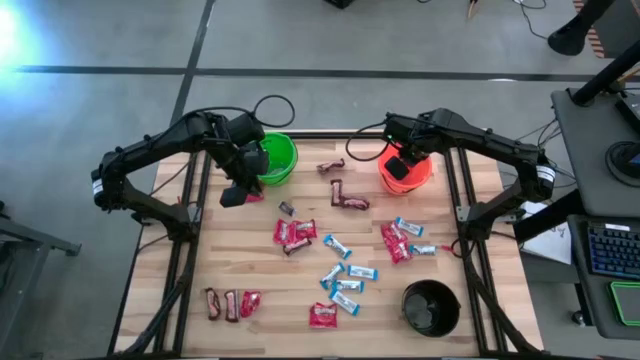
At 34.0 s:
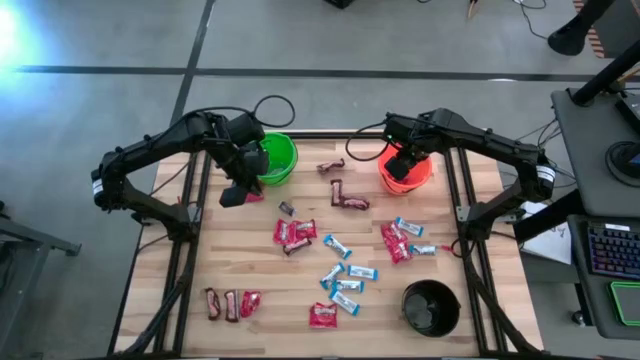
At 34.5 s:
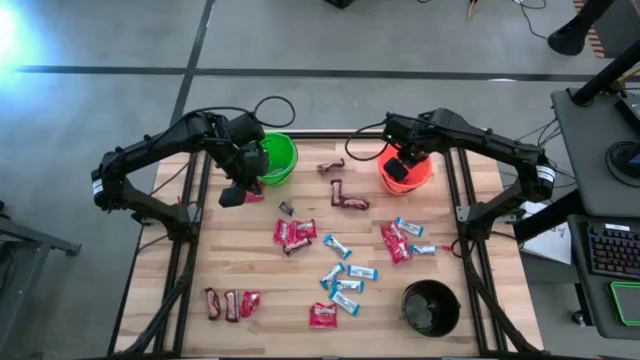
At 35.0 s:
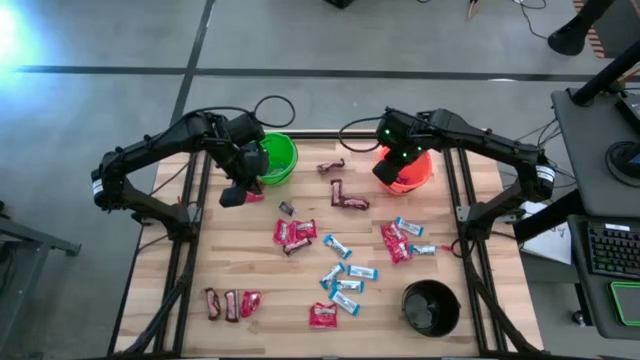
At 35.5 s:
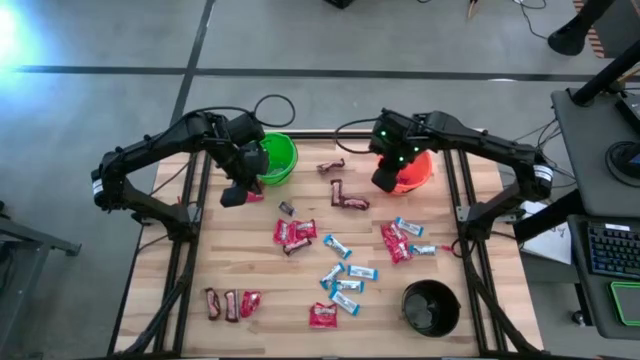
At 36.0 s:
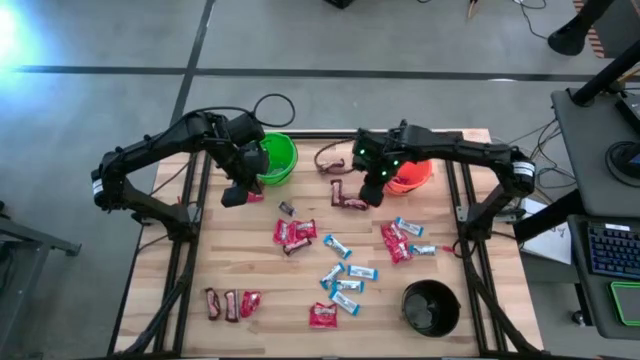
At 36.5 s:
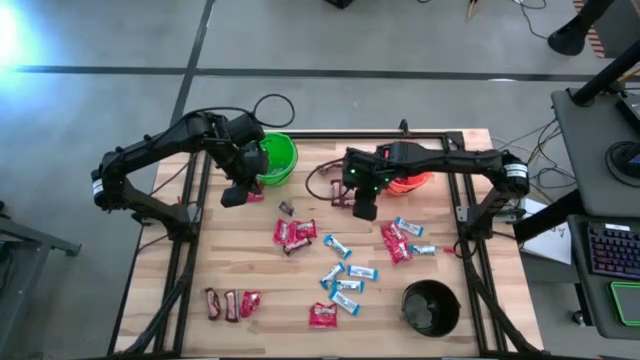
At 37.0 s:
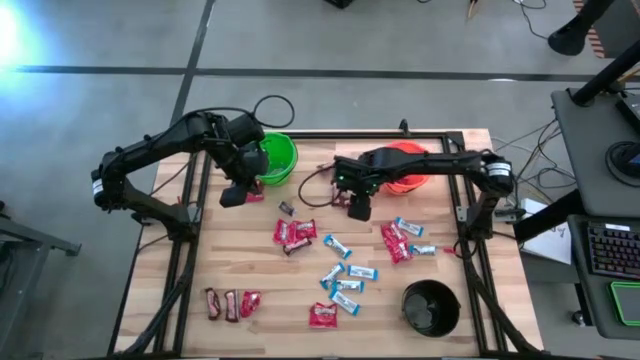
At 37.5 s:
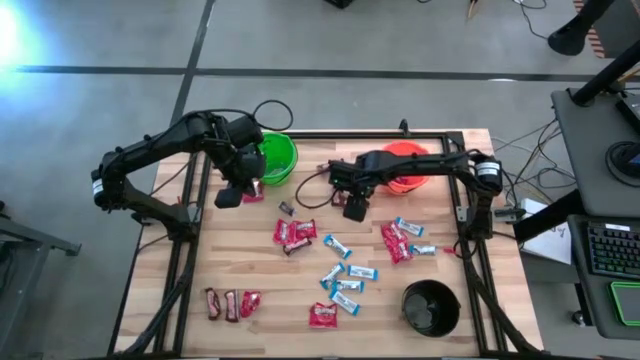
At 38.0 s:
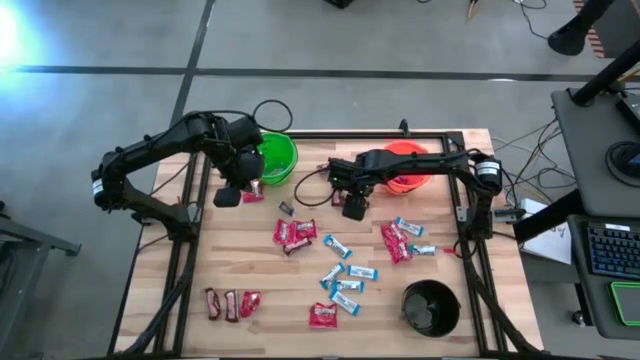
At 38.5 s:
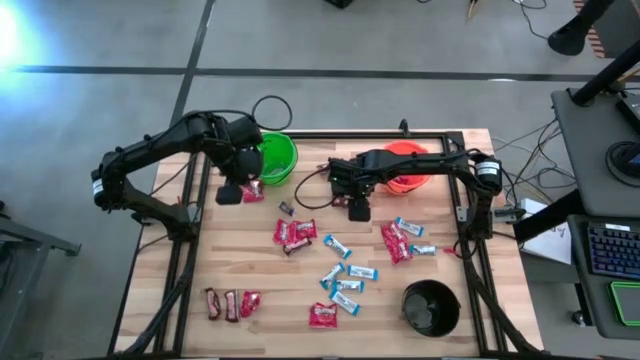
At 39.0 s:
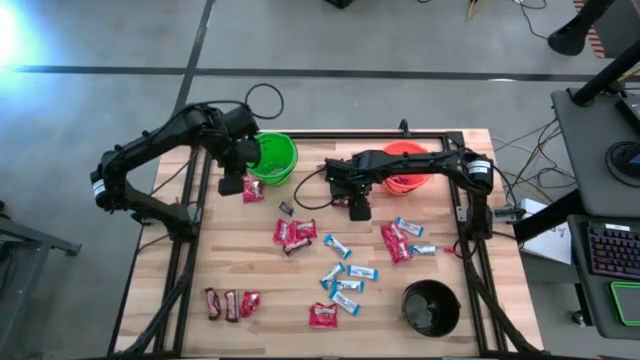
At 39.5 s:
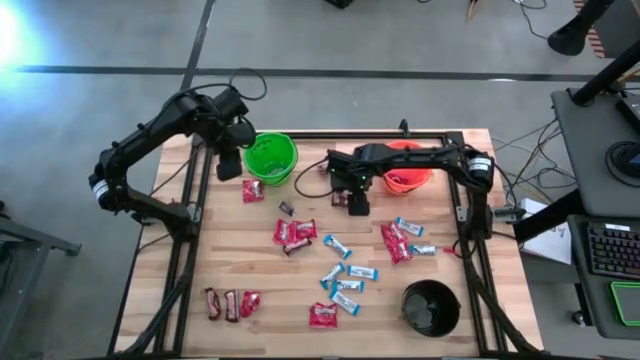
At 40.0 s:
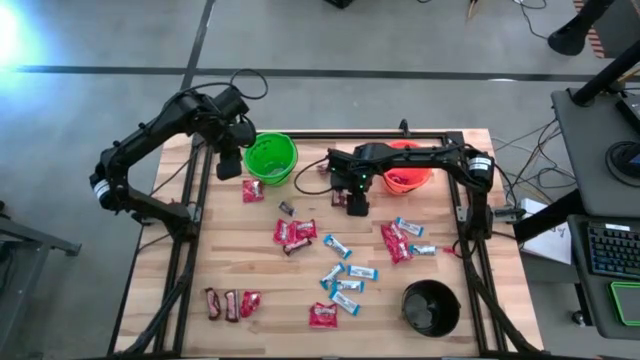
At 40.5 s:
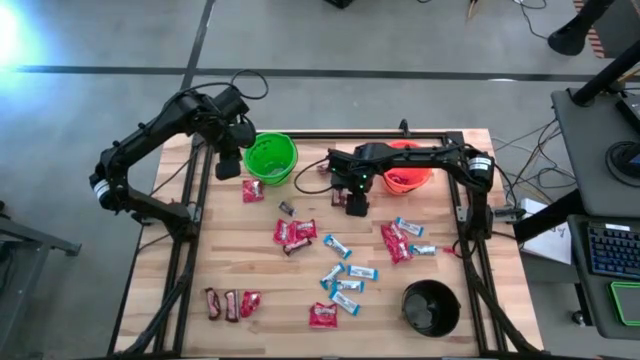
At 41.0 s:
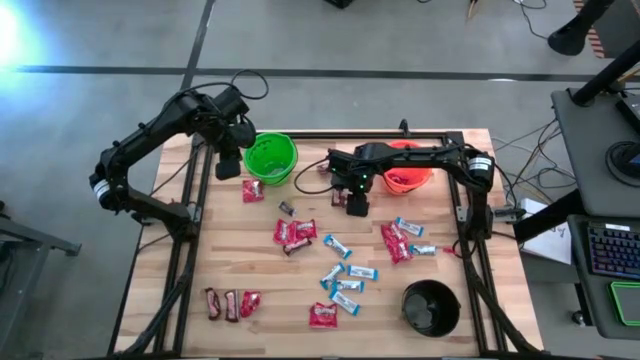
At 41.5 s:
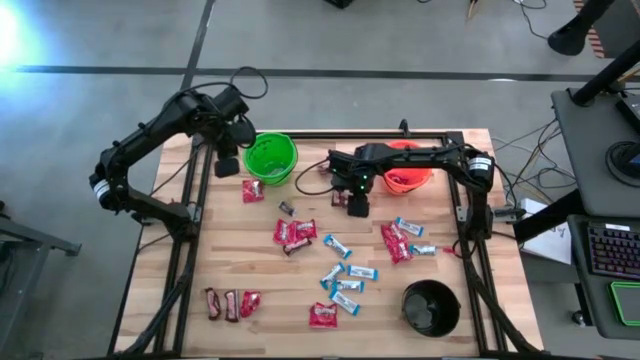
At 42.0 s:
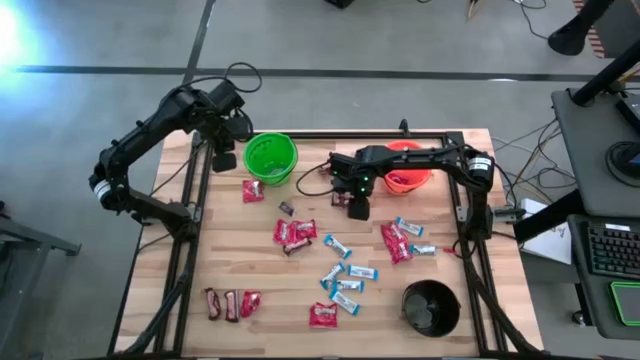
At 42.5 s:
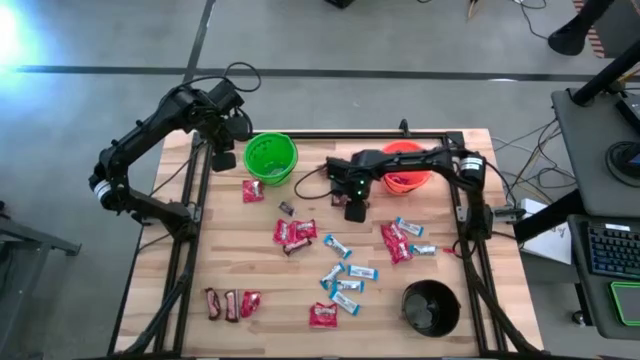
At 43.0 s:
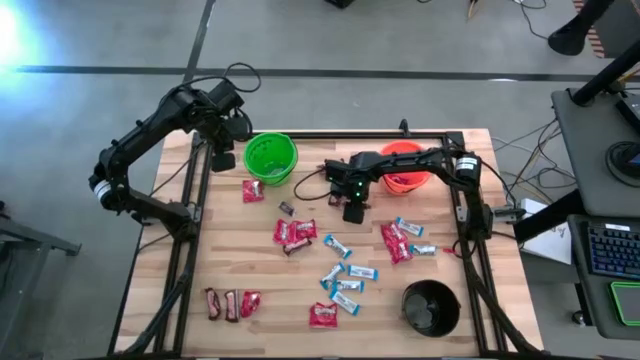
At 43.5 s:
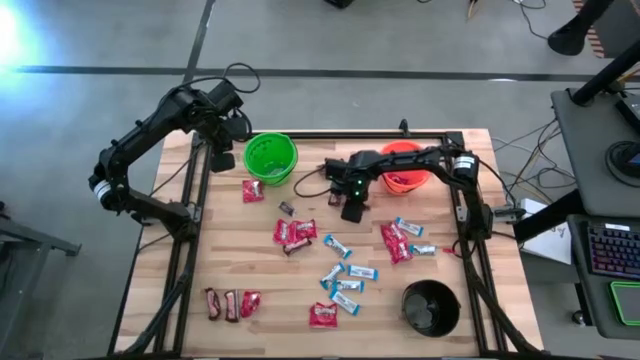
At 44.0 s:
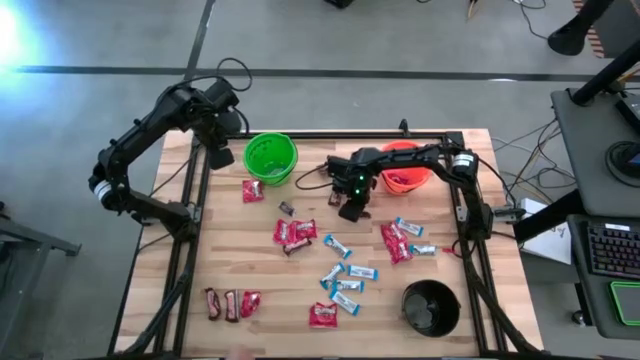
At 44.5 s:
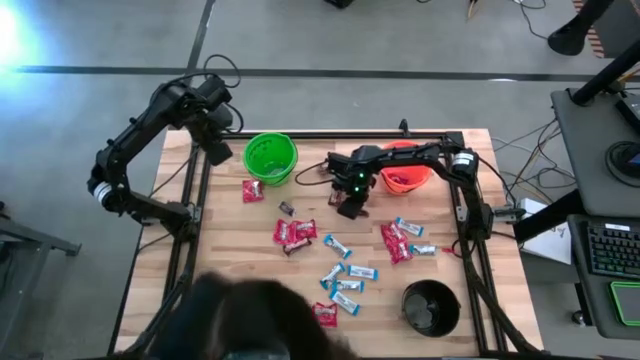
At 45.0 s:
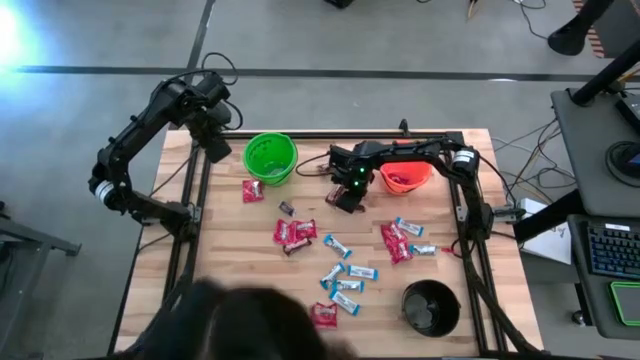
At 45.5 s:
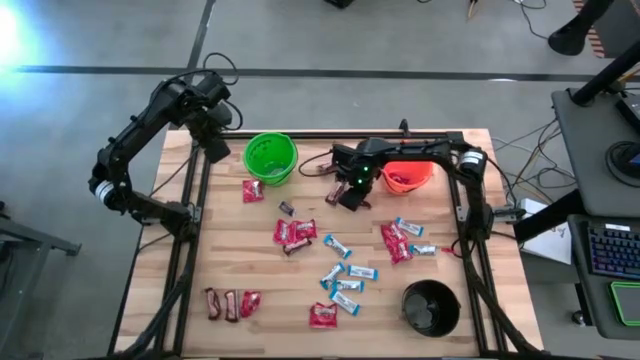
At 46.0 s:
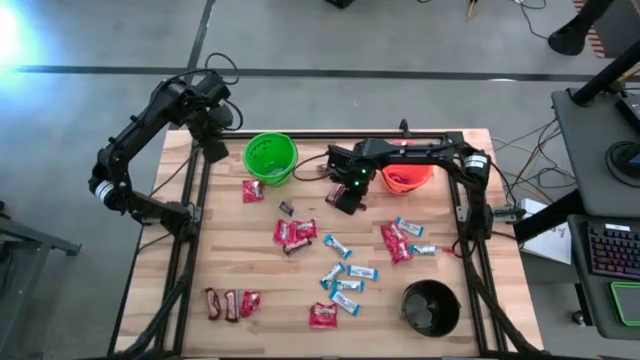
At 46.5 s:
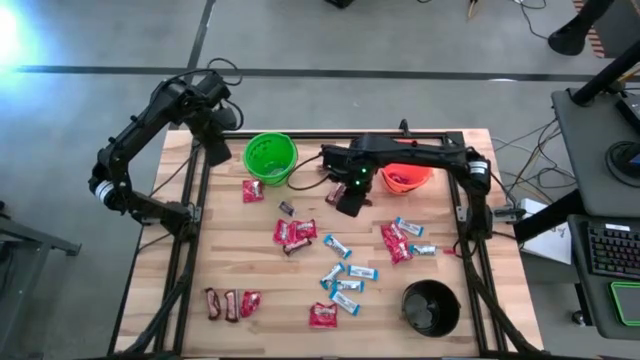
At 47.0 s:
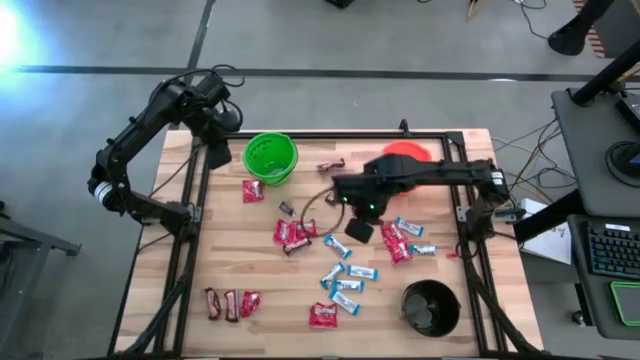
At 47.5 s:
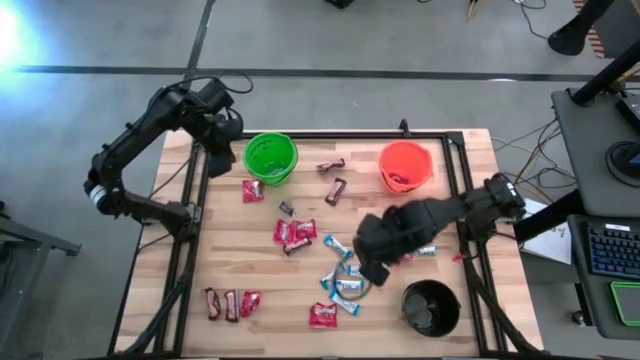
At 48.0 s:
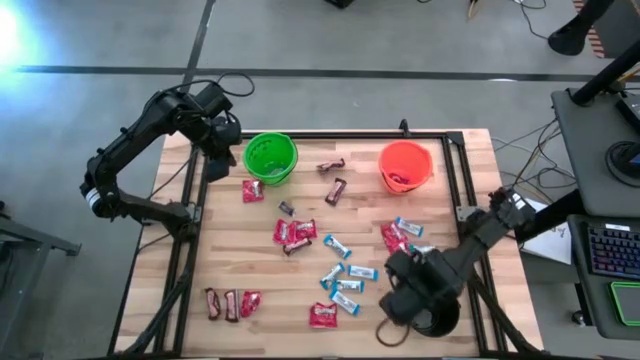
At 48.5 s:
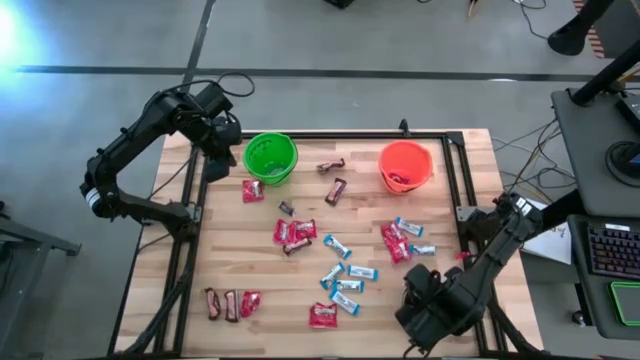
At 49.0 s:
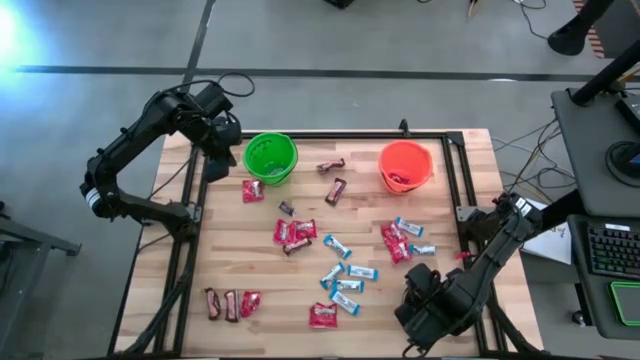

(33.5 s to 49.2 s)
Task: Sort candy
Put the brown candy into the black bucket

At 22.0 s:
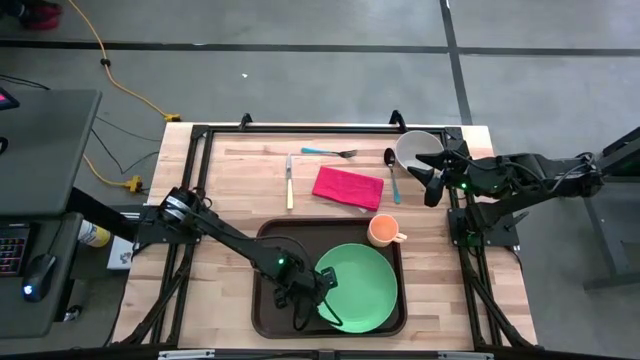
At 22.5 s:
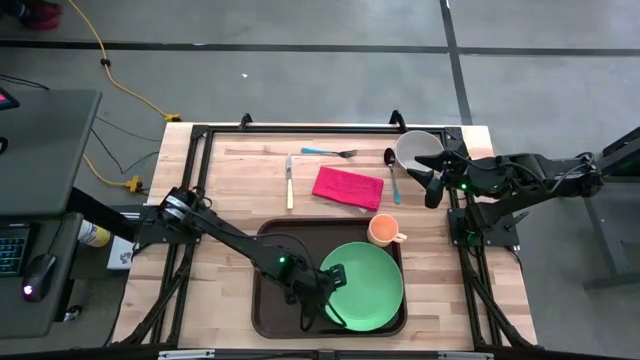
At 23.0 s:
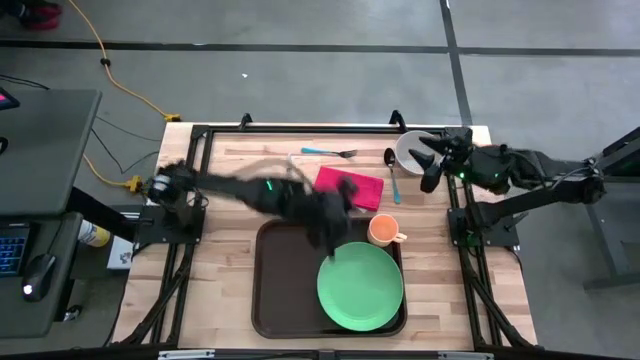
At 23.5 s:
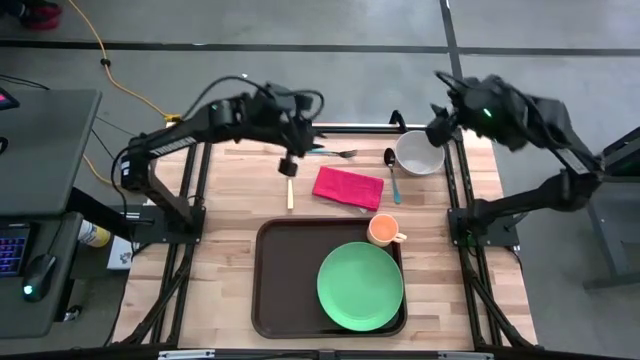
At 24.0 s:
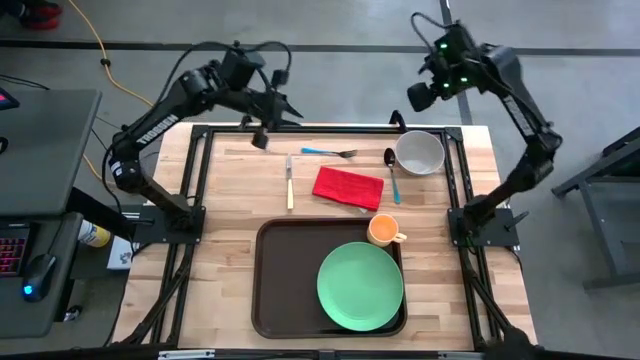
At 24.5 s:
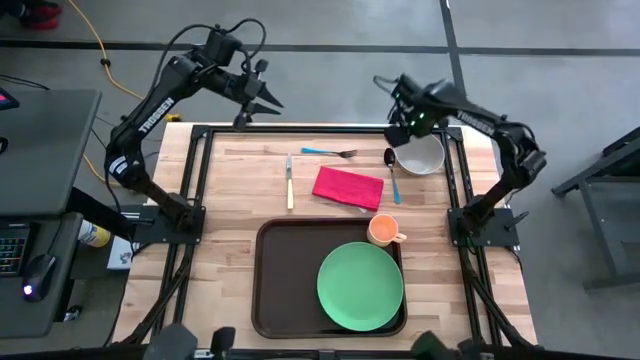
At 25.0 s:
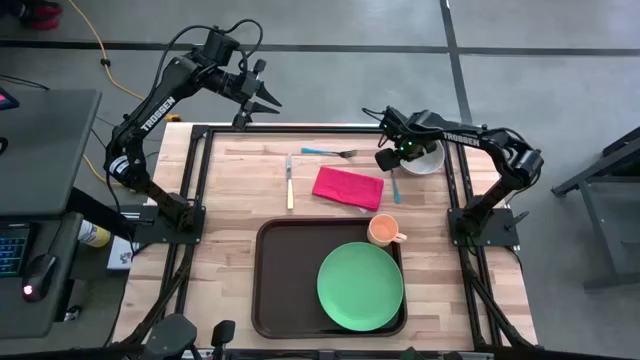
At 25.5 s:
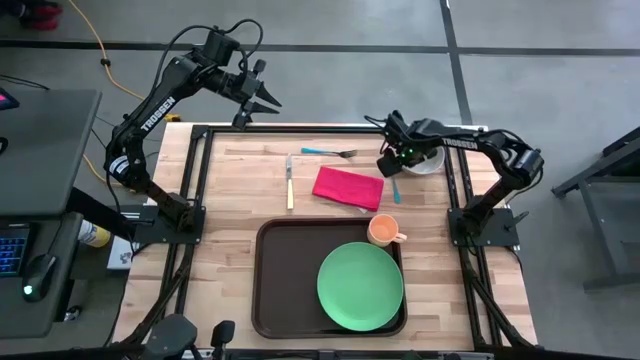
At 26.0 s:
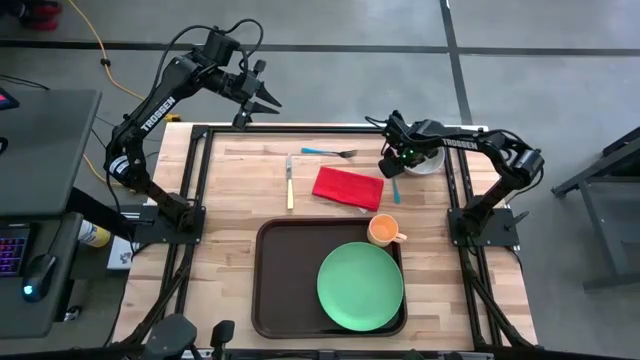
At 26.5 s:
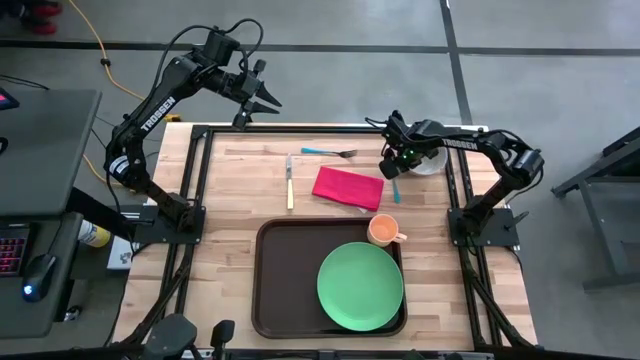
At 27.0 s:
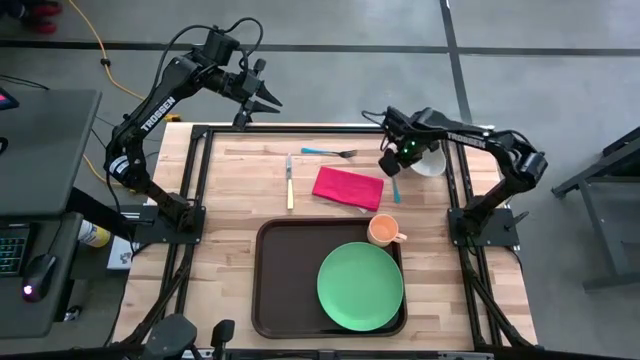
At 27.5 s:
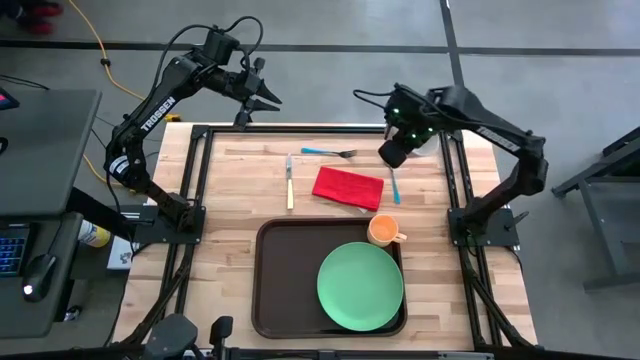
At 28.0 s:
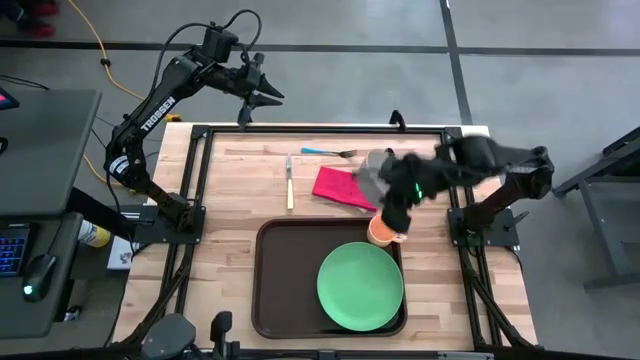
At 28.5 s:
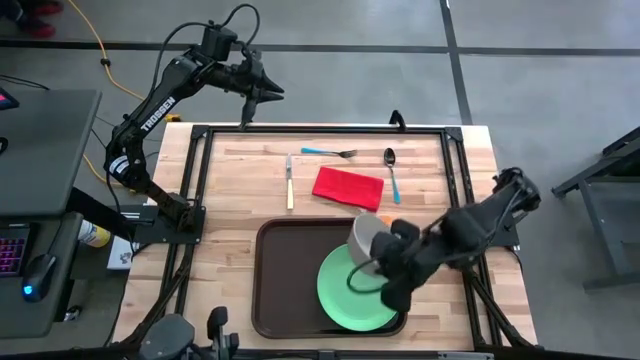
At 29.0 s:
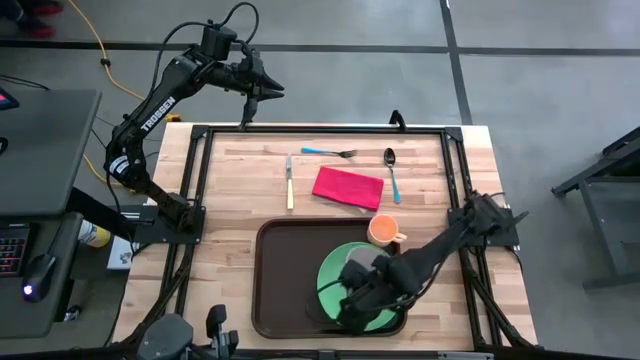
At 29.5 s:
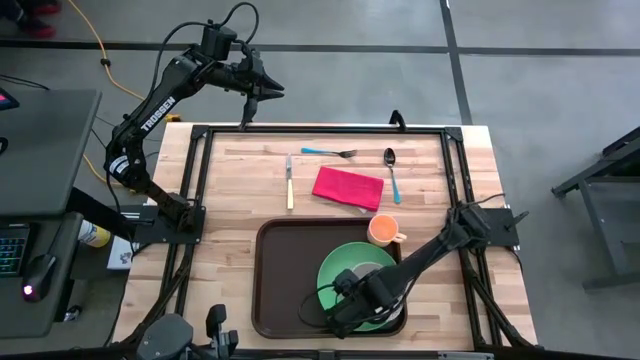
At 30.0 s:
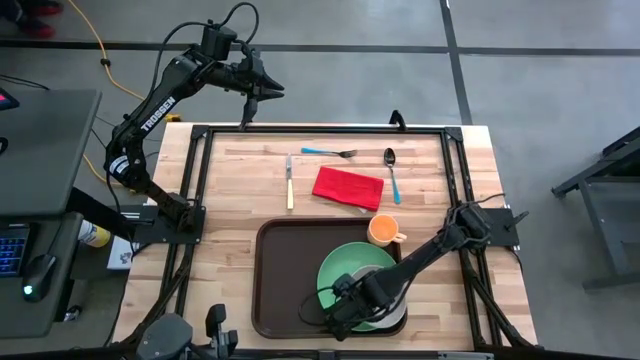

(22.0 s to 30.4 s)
Task: Set up tray
Put the white bowl on the top of the green plate
